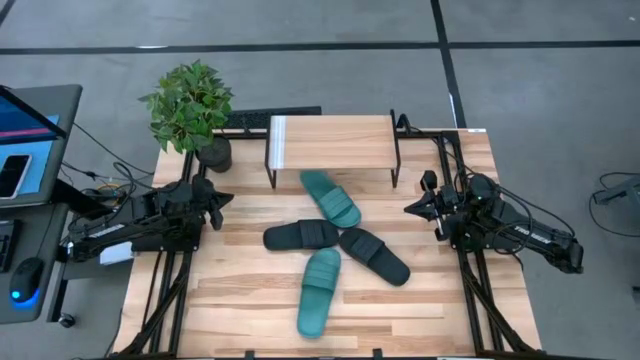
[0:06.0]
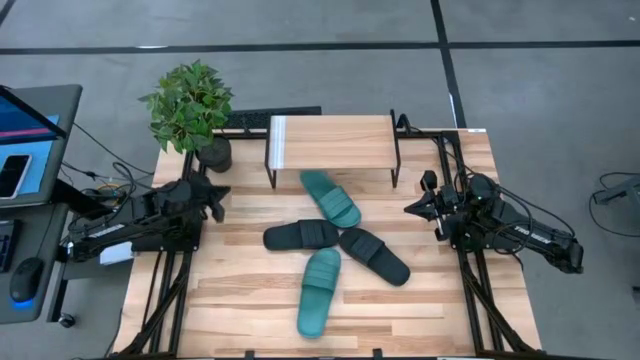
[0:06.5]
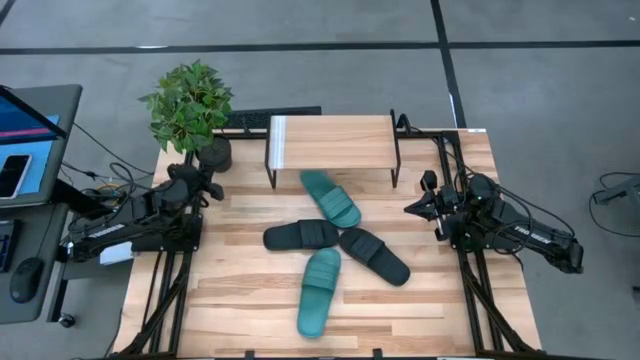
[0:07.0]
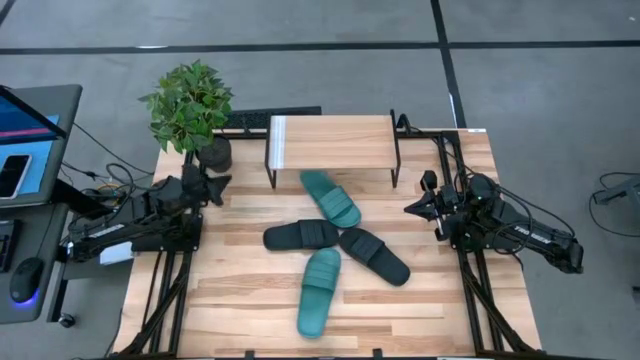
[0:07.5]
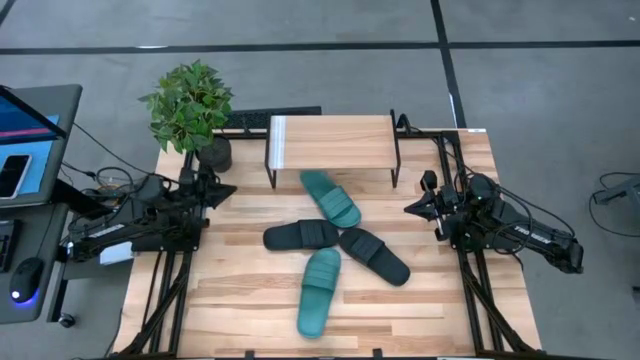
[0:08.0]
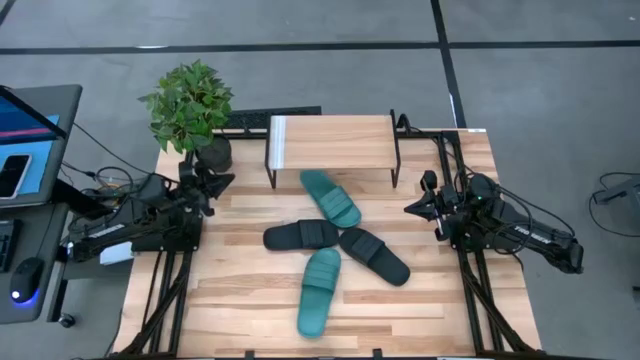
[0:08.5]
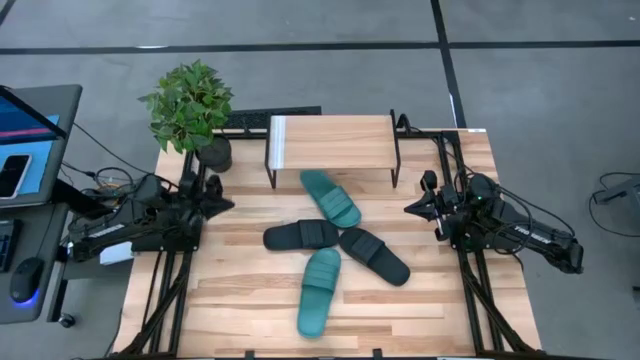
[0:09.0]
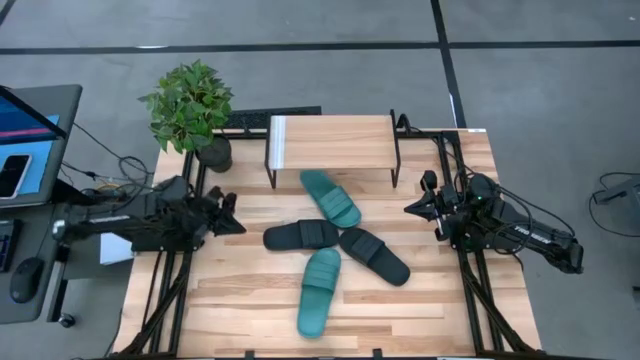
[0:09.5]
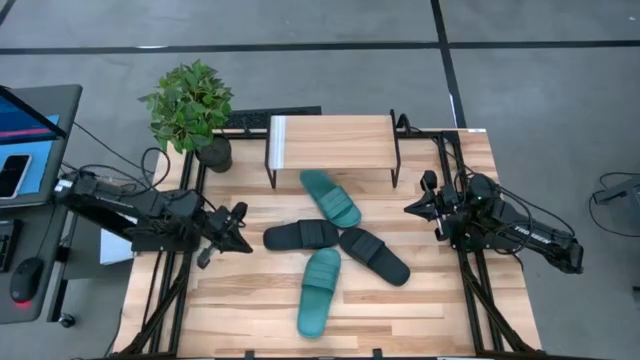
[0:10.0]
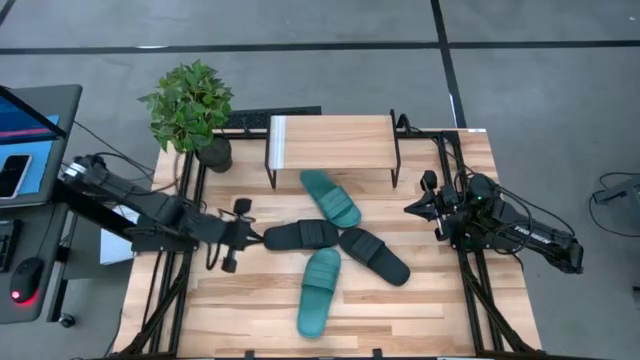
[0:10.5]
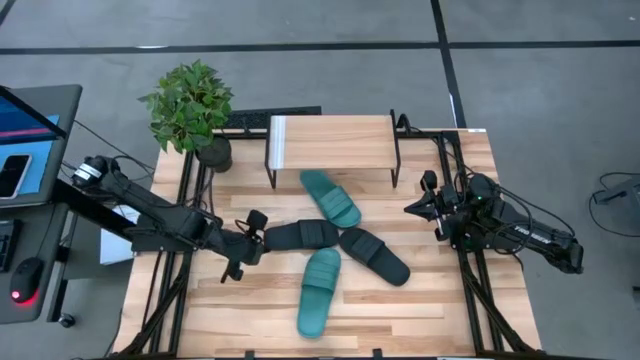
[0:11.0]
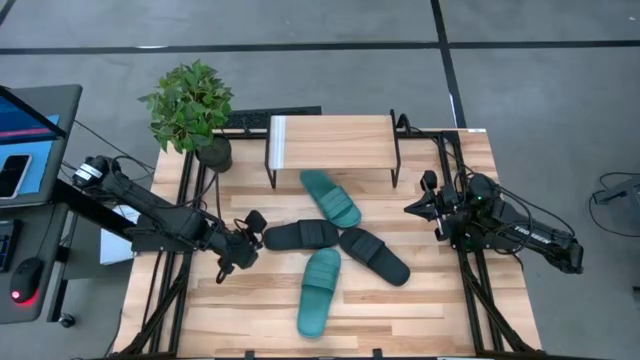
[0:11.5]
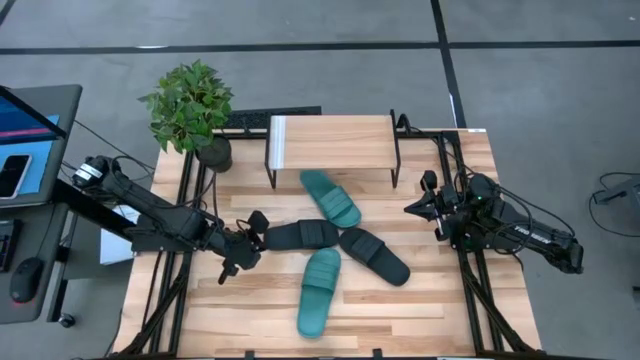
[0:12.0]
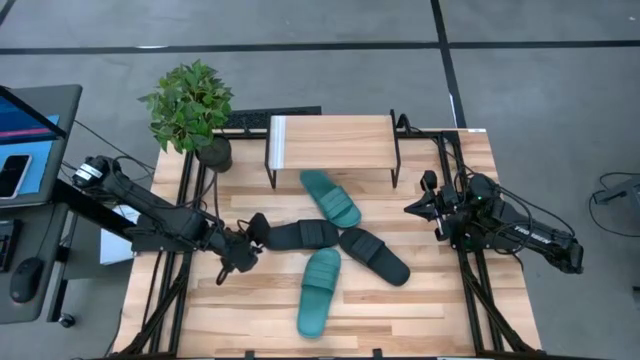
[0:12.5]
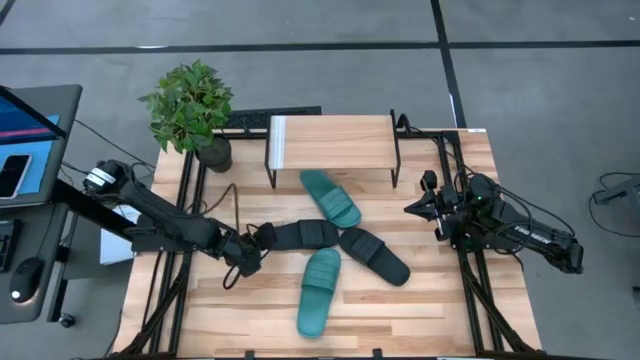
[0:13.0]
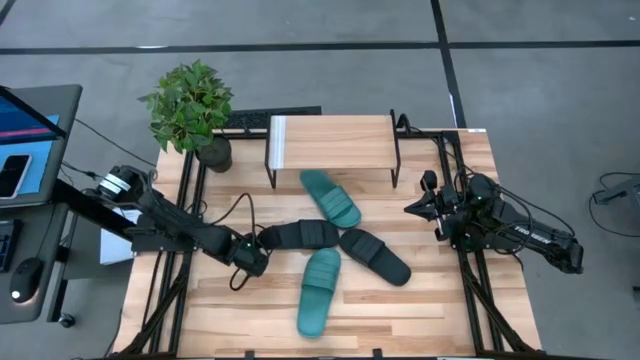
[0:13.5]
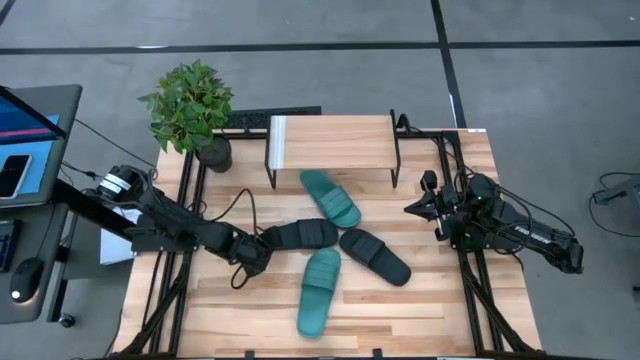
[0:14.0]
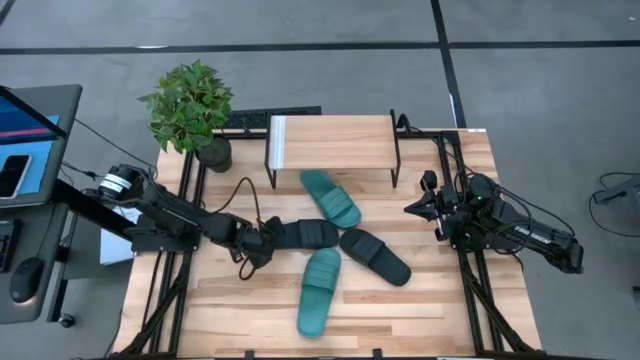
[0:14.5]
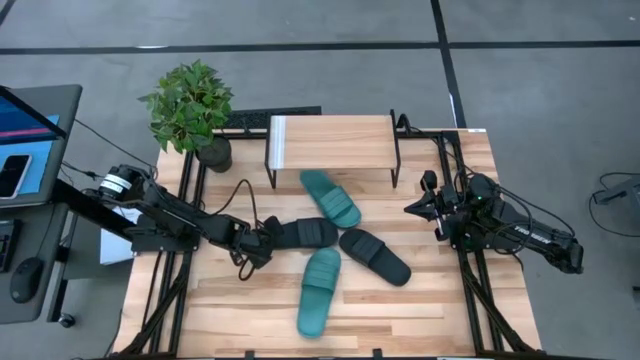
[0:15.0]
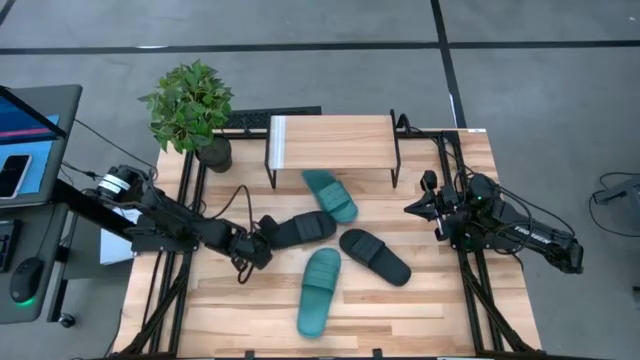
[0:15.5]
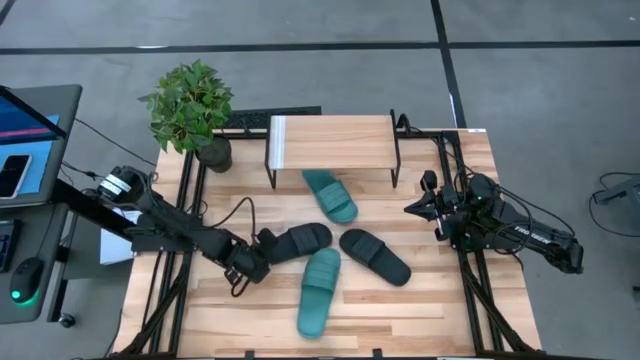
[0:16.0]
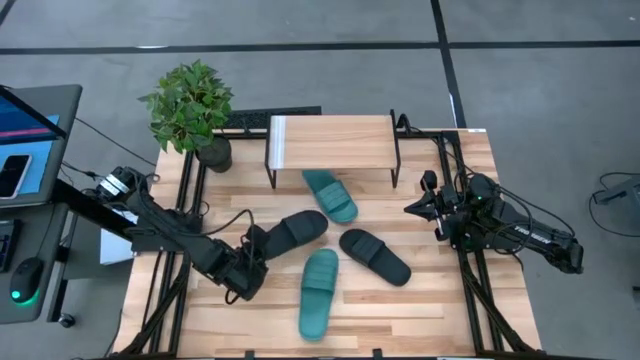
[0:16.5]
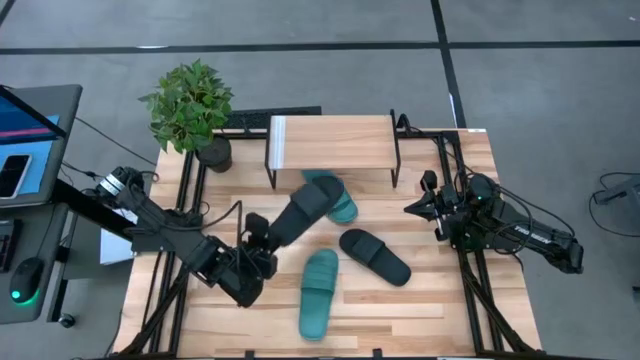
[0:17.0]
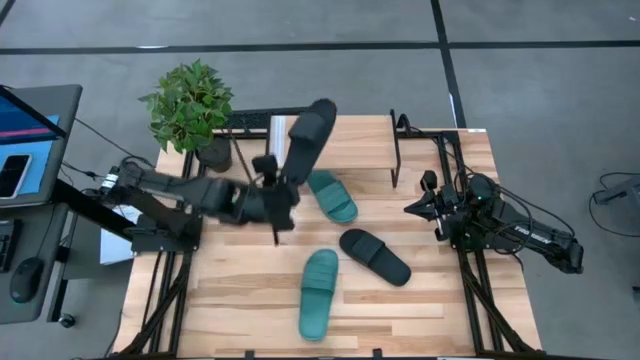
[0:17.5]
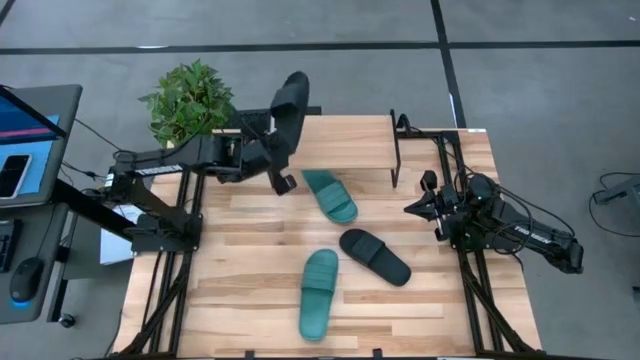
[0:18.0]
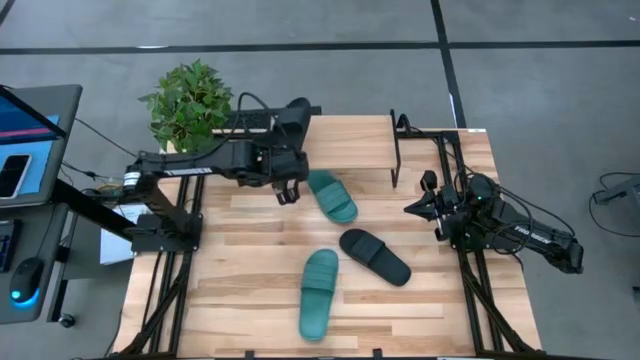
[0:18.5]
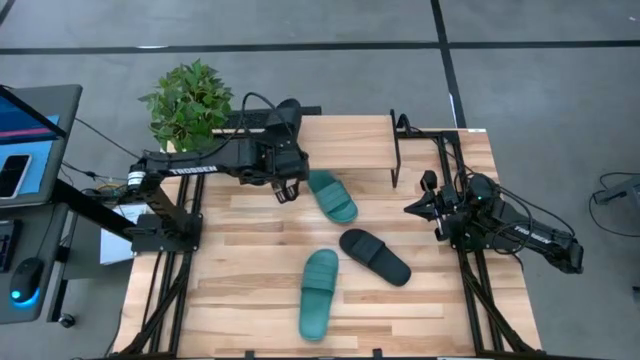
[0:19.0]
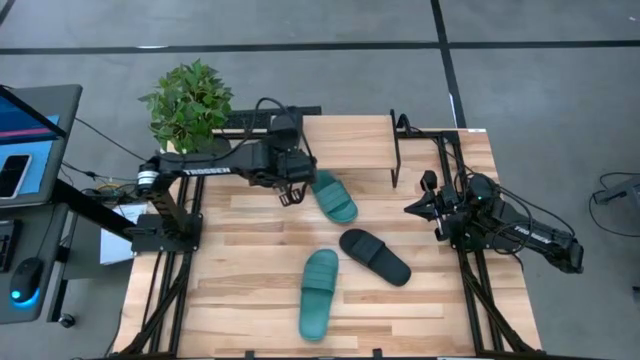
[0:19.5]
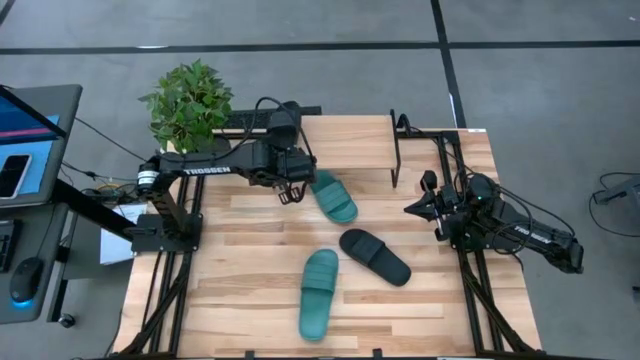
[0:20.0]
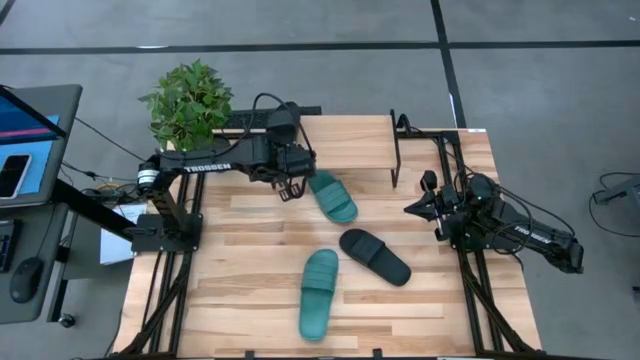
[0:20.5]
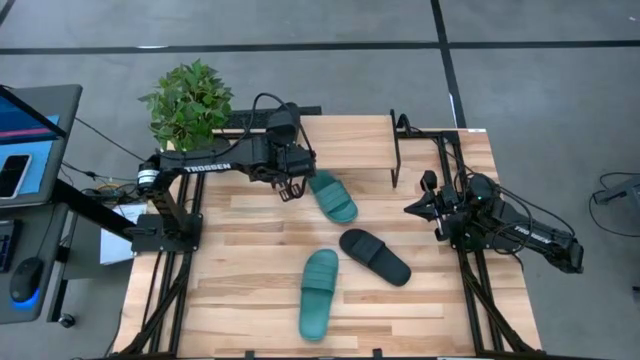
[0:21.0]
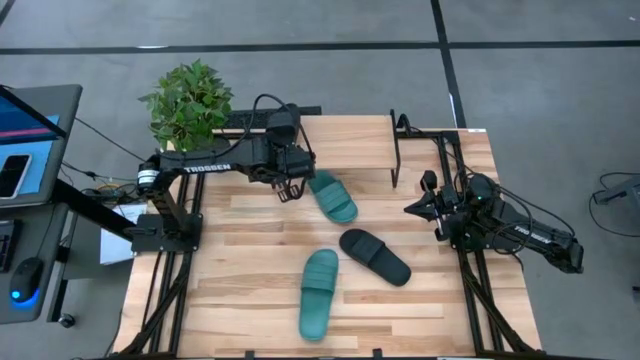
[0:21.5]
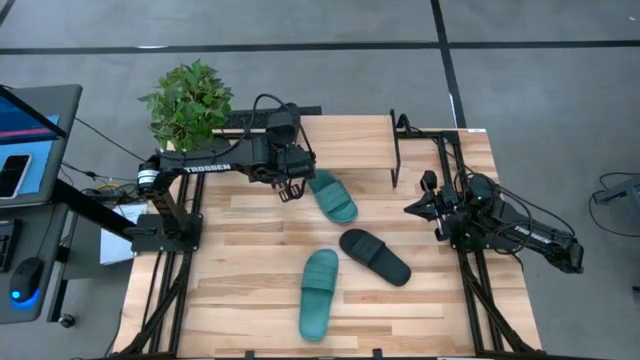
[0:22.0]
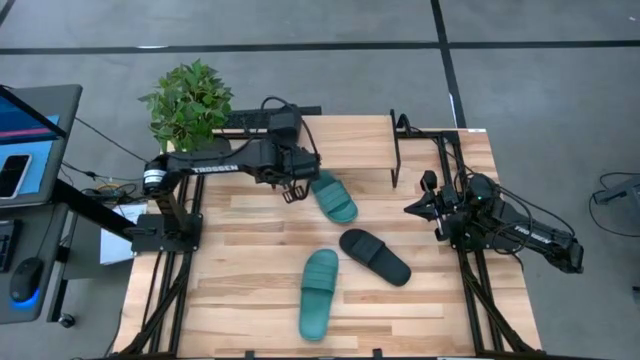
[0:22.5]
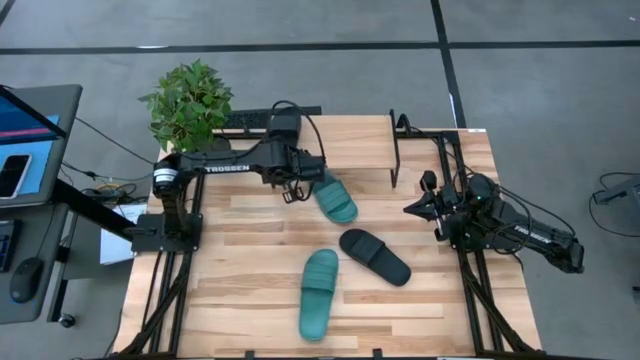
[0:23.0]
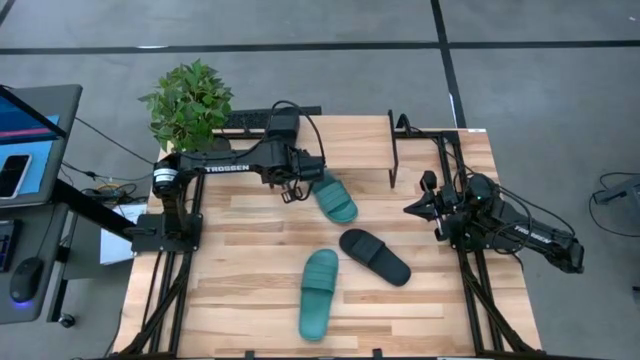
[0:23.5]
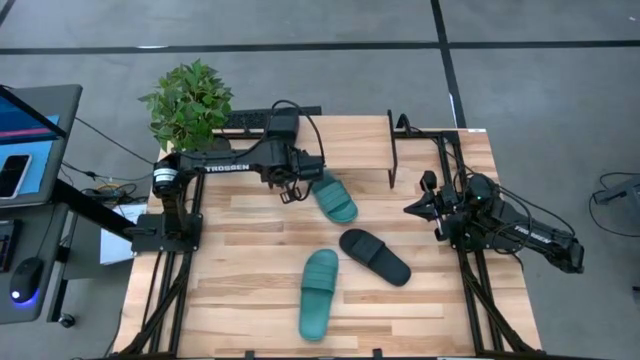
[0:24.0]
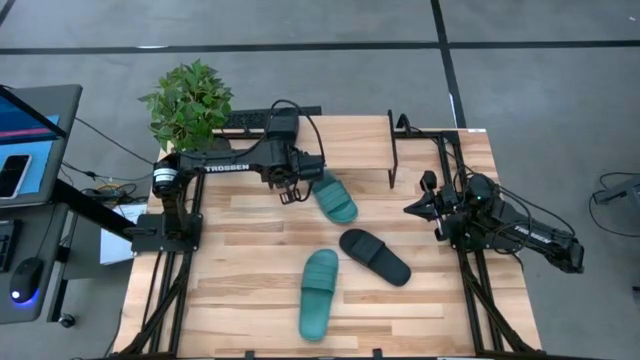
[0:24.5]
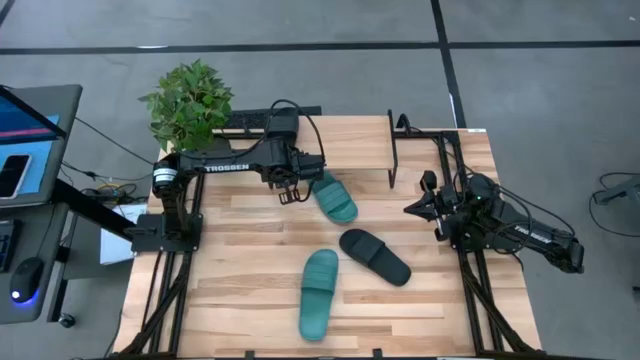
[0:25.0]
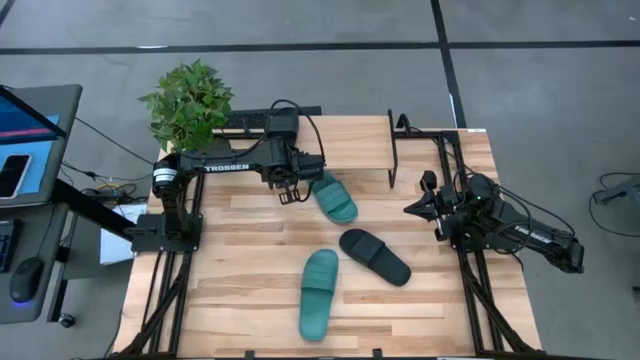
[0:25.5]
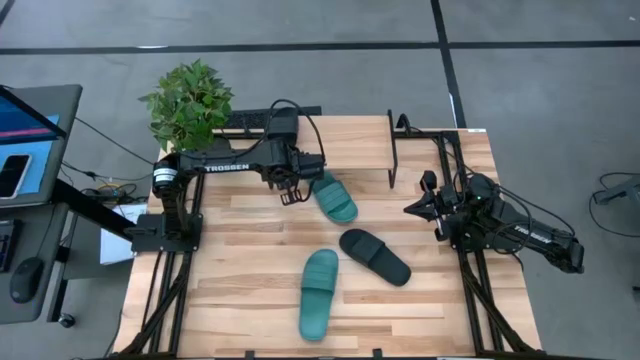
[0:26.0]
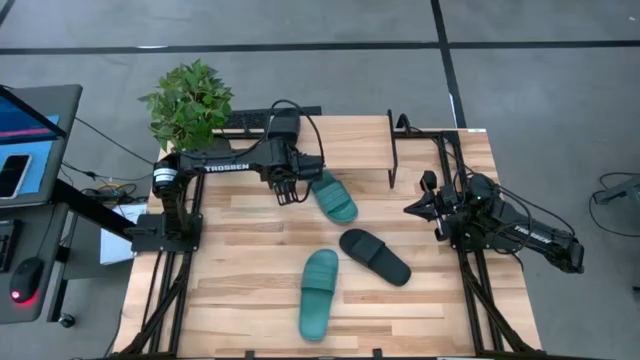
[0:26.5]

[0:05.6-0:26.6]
Task: Pick and place slides into the shelf
Put the left black pair of slippers on the shelf
